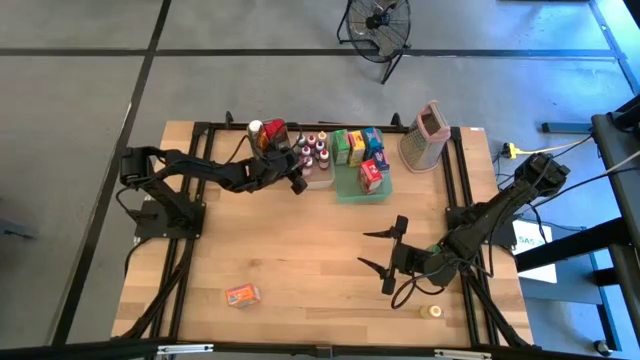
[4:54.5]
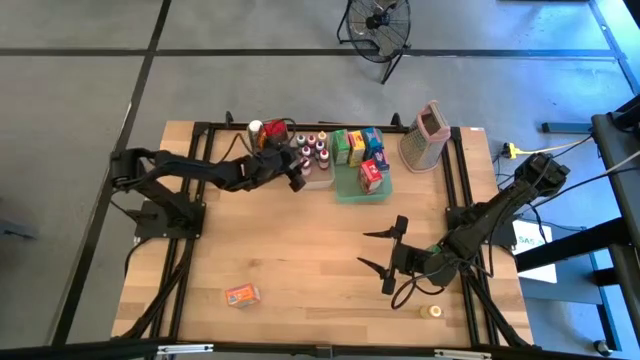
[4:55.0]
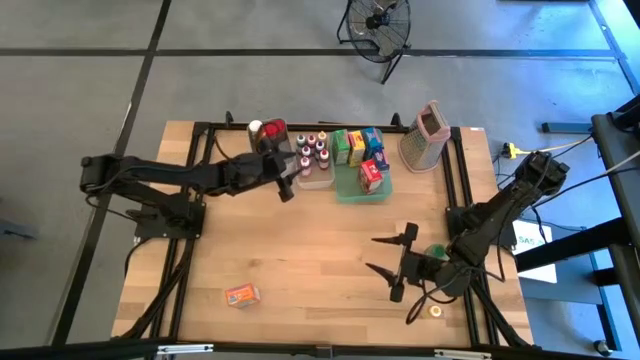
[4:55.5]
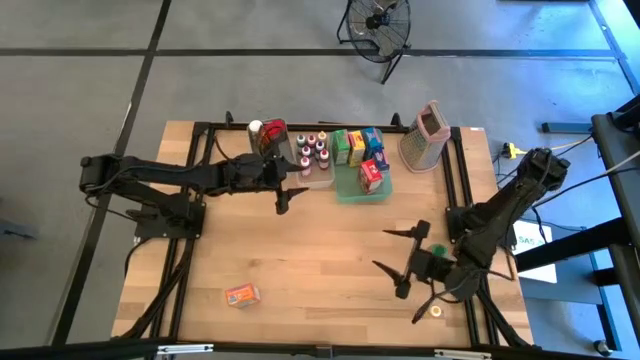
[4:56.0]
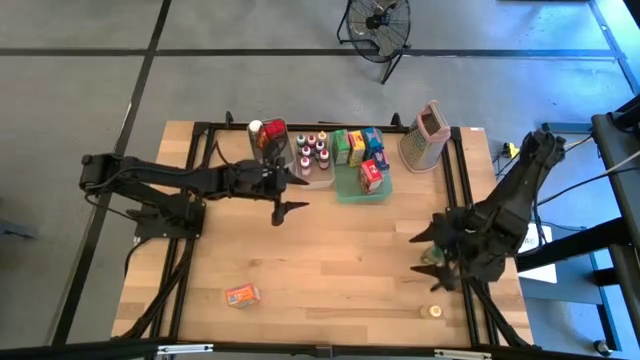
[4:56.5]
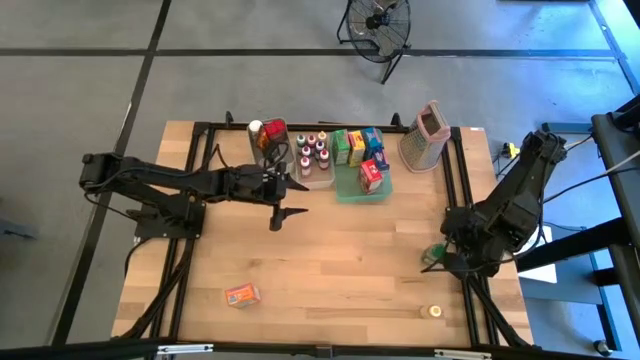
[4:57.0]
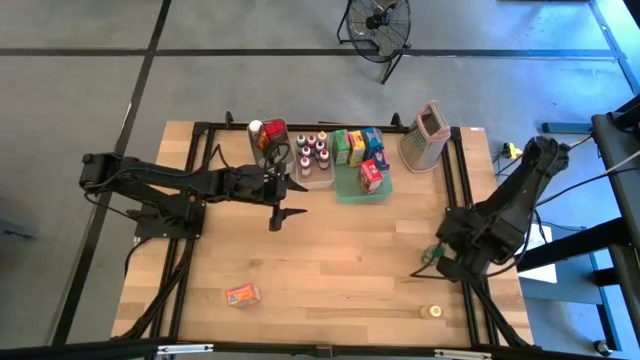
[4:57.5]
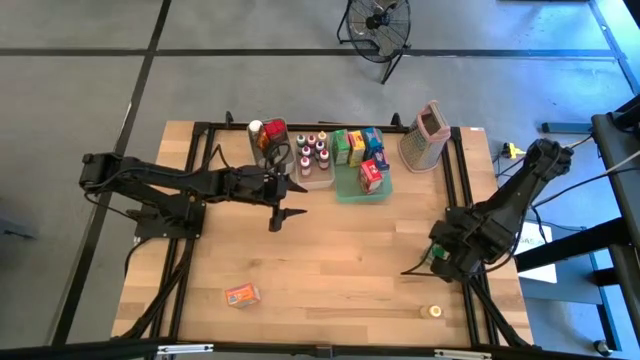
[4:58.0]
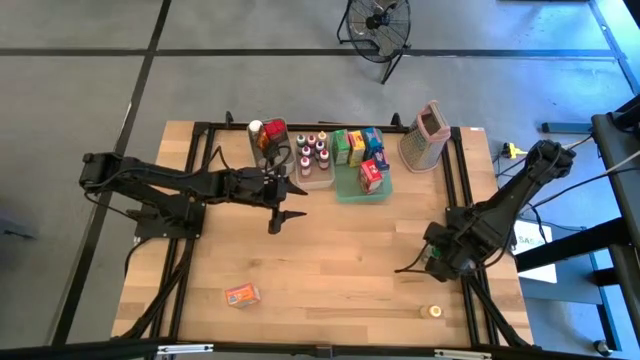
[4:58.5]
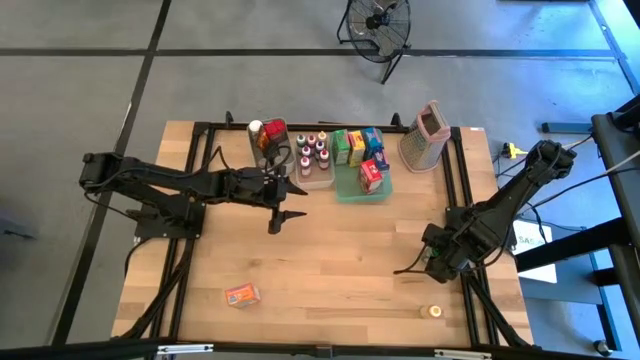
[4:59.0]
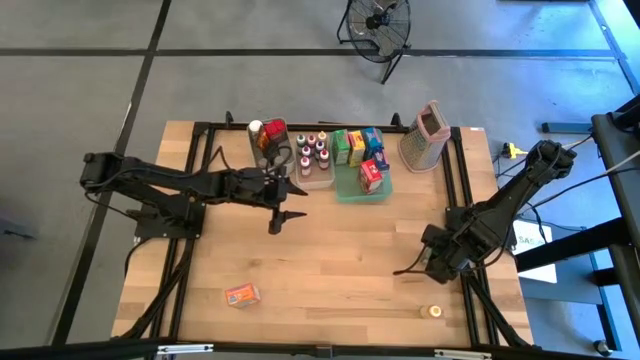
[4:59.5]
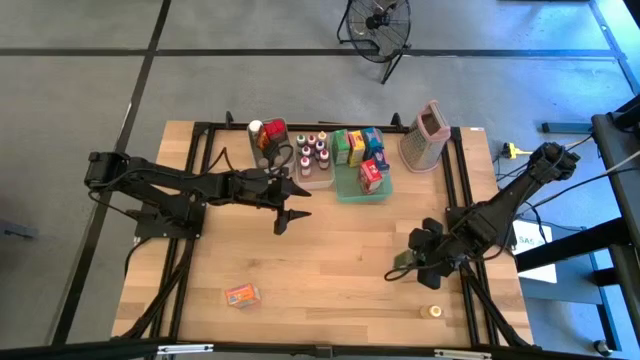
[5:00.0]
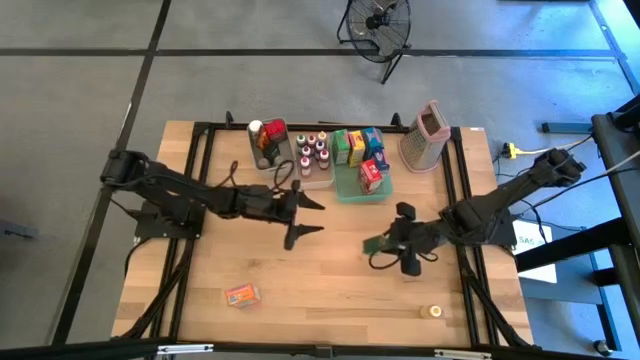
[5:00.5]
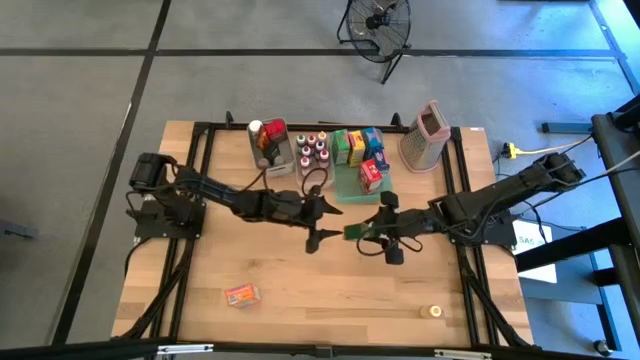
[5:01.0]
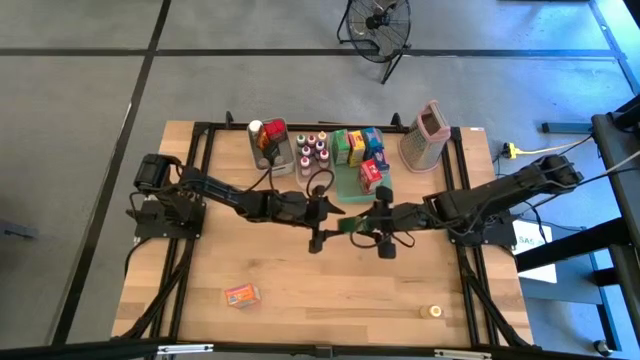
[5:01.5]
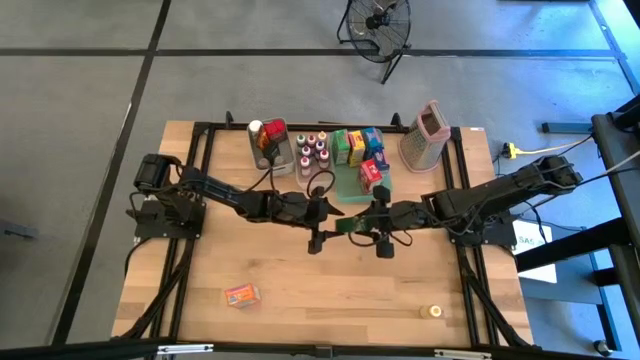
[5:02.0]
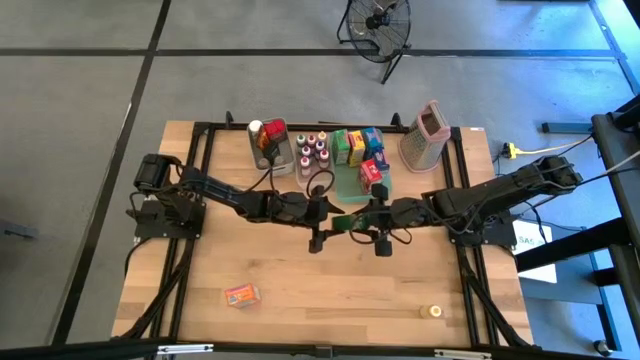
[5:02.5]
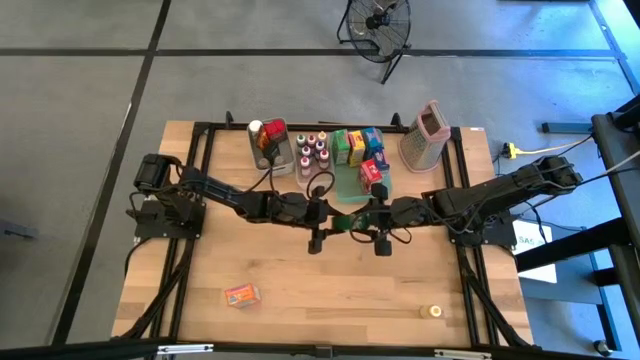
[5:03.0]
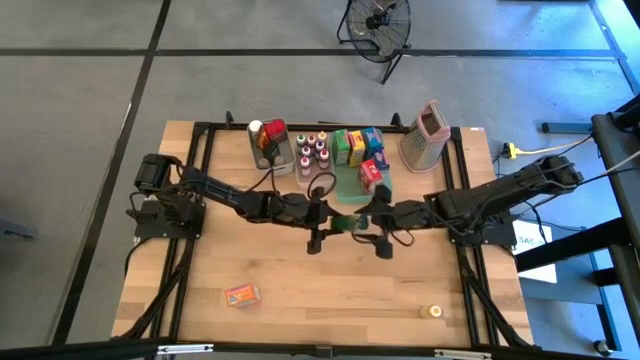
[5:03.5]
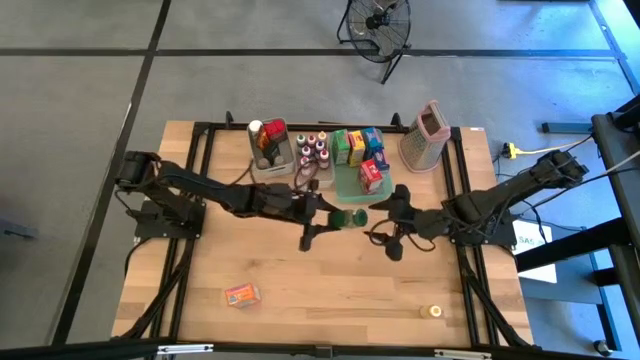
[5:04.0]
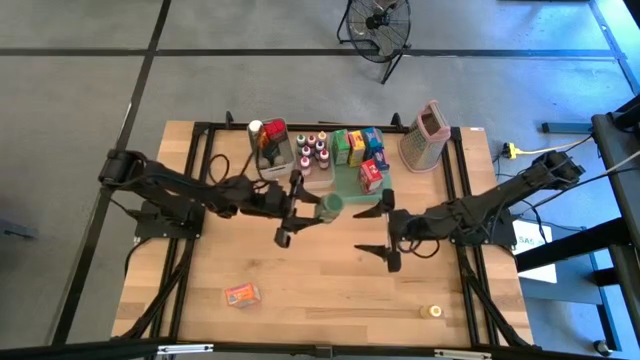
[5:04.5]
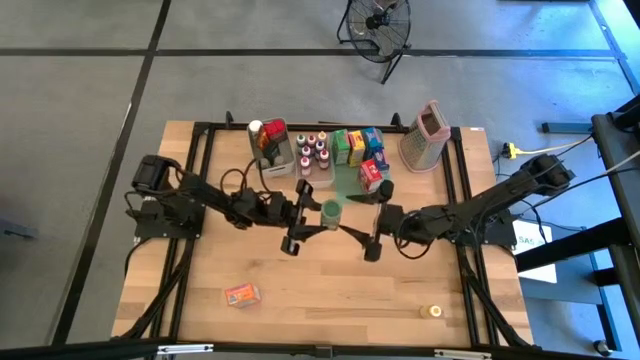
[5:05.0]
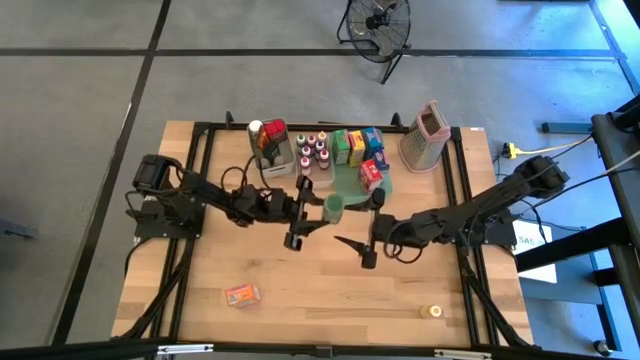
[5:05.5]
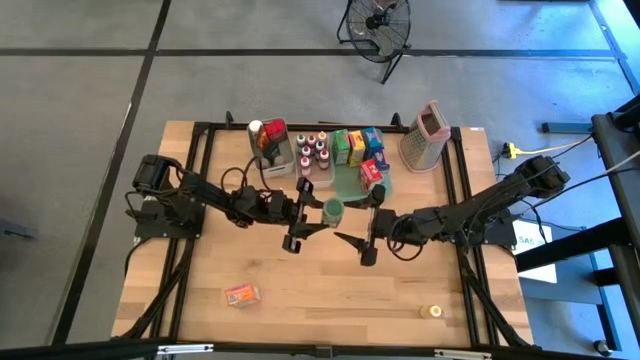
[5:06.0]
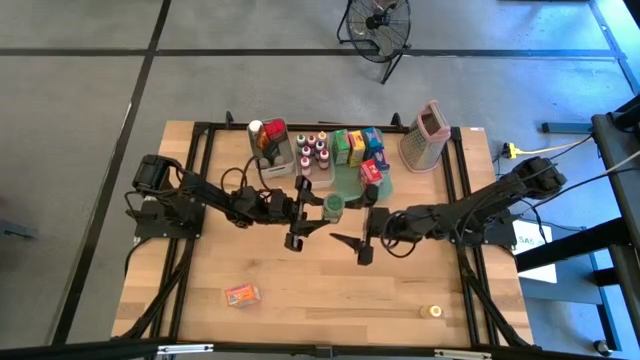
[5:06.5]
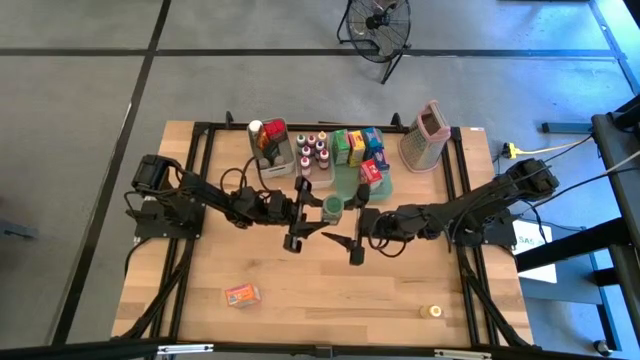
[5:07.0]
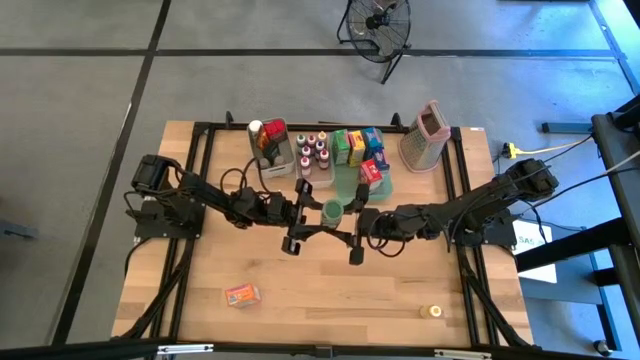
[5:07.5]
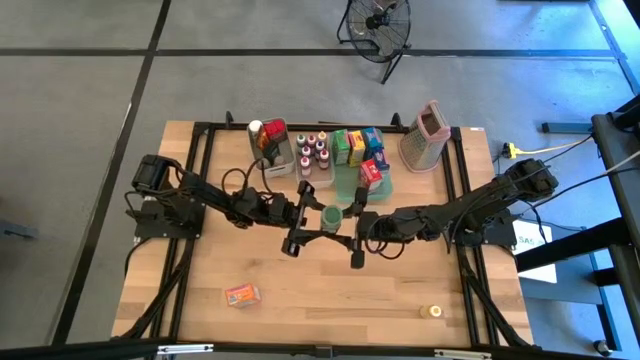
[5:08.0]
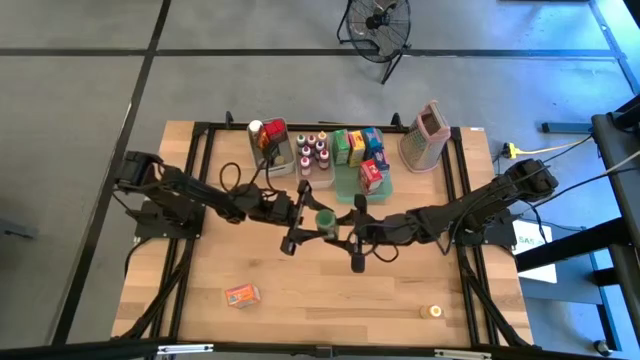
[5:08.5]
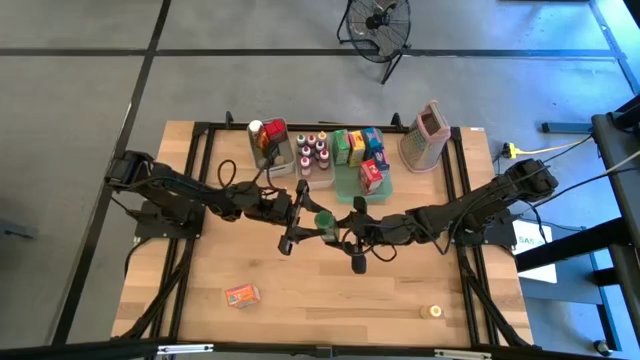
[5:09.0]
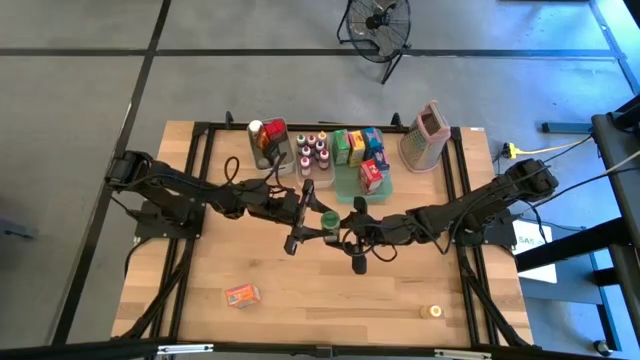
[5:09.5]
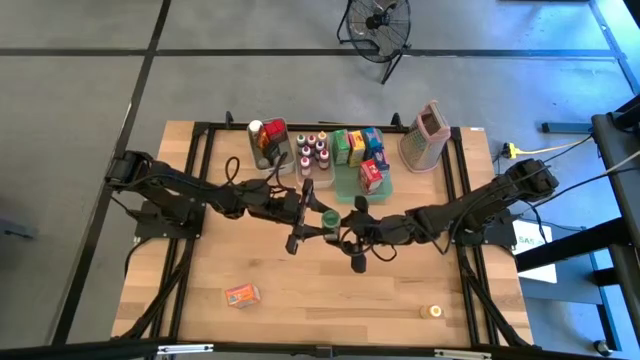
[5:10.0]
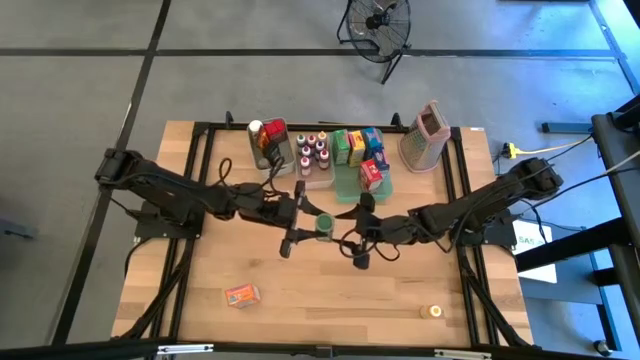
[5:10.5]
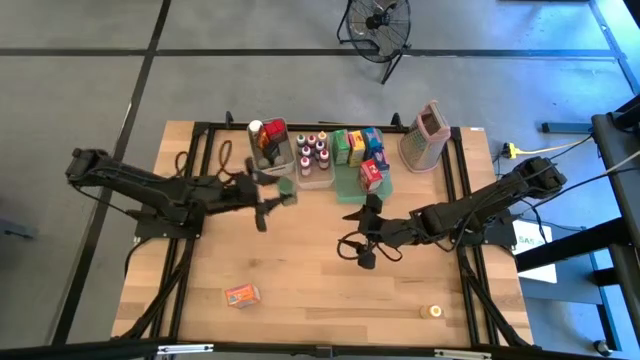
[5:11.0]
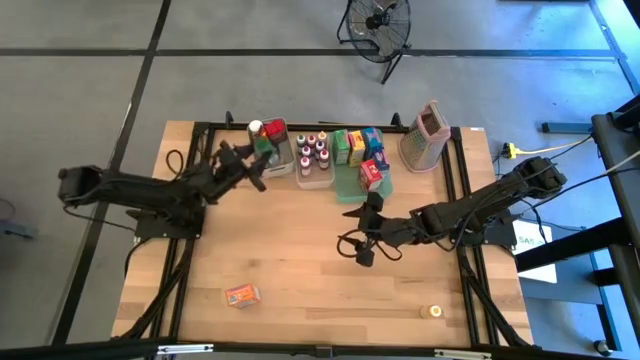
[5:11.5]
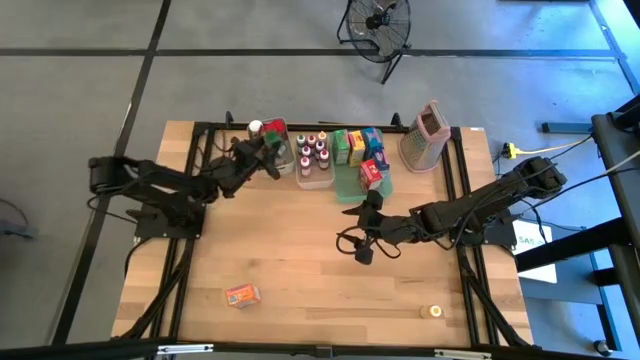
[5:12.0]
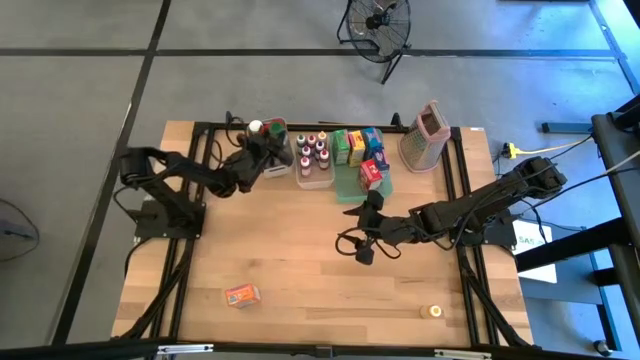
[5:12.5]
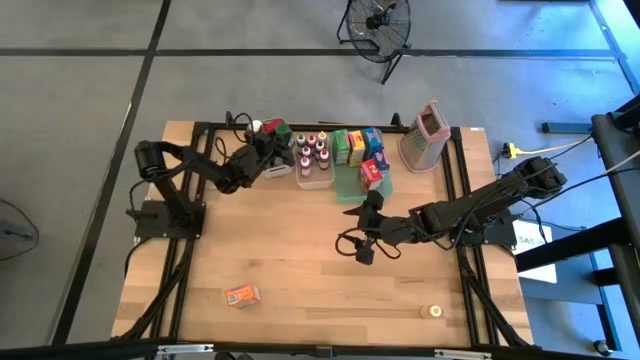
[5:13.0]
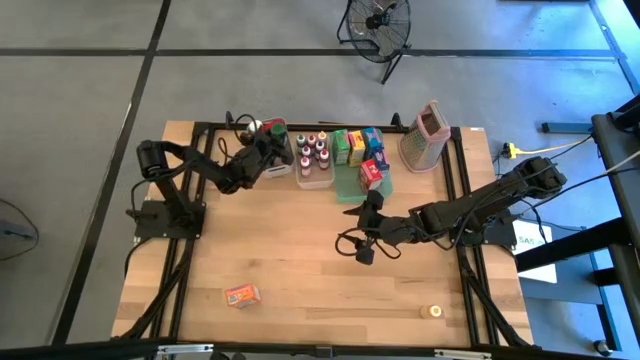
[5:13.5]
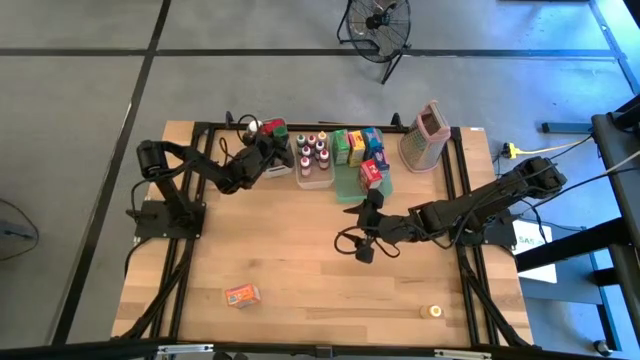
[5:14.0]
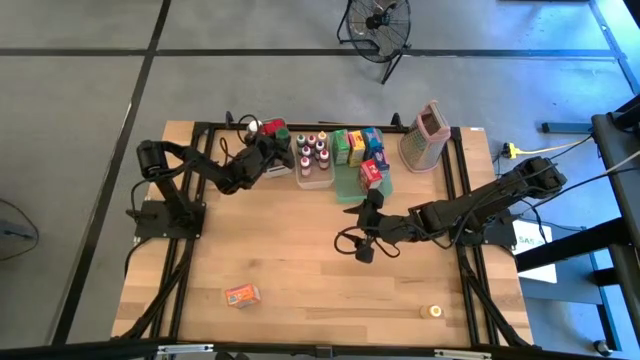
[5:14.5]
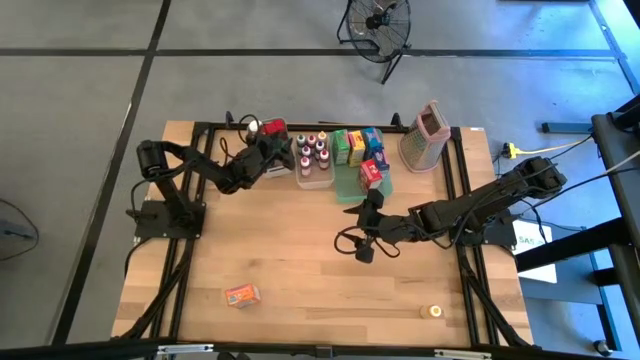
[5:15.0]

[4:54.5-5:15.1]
Task: Pick & Place Kitchen Items
Put the green seasoning bottle into the gray bin

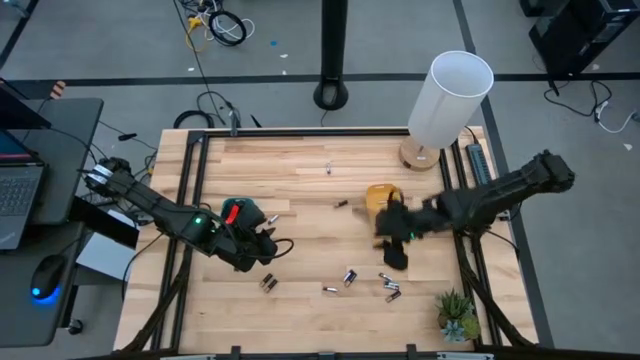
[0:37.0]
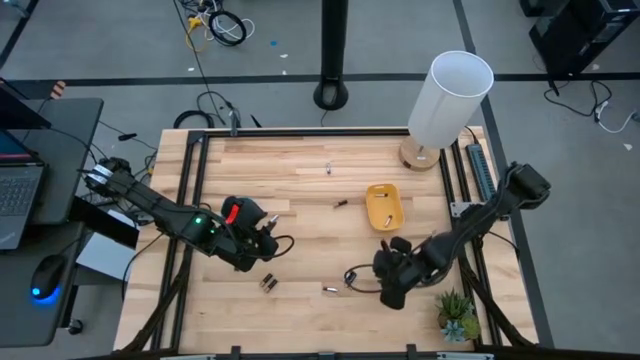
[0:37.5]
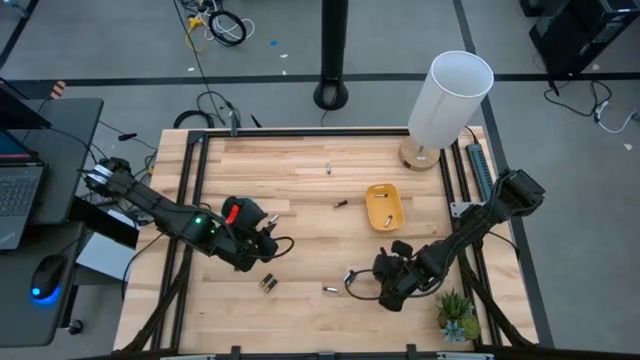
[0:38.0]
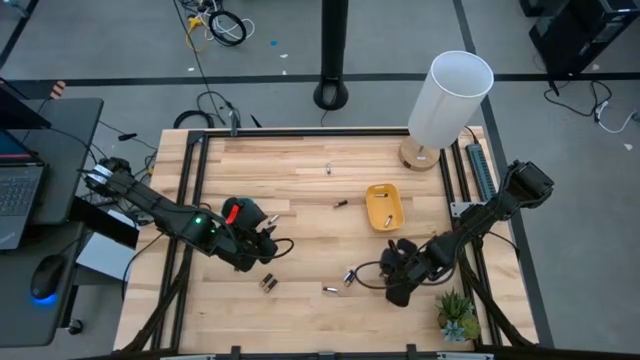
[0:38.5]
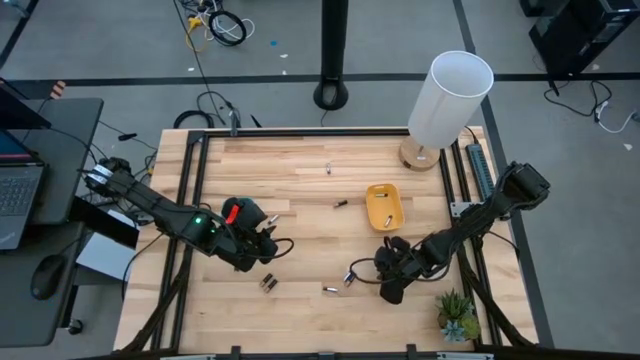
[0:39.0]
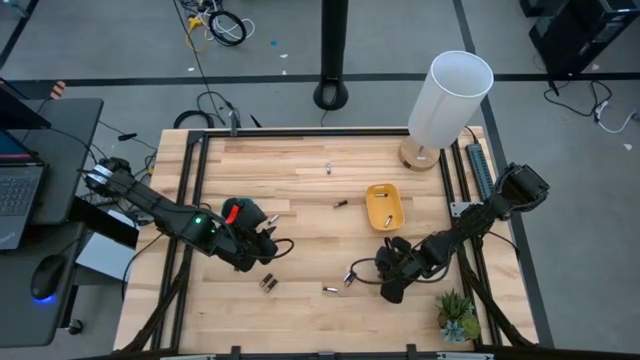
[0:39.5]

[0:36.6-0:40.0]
Task: Sort batteries
Put the silver battery into the green bin
